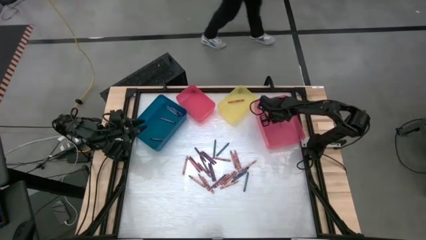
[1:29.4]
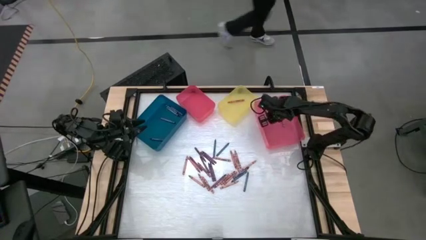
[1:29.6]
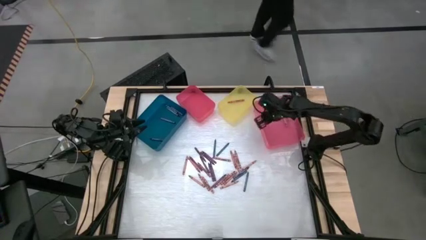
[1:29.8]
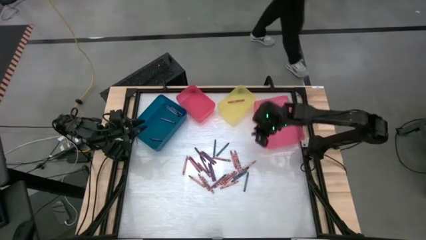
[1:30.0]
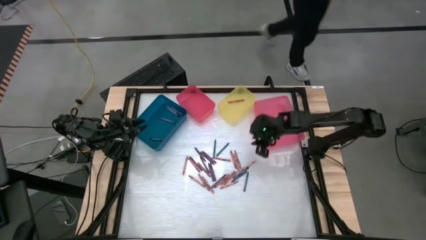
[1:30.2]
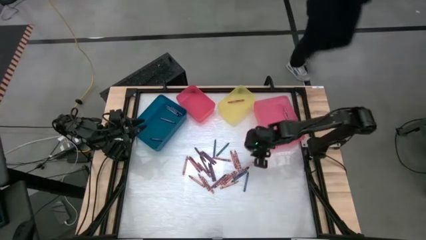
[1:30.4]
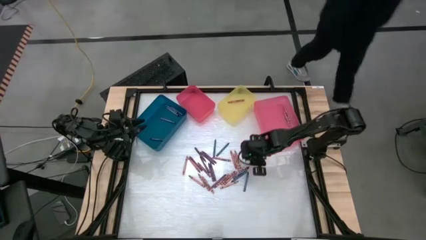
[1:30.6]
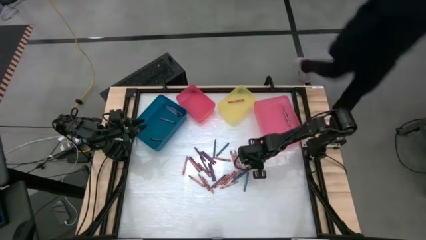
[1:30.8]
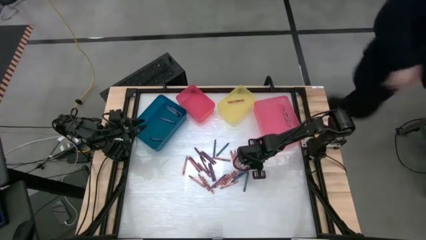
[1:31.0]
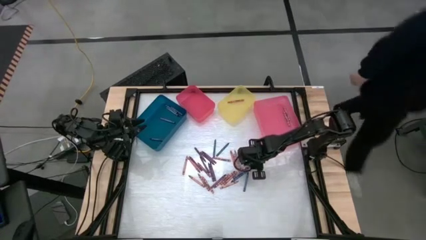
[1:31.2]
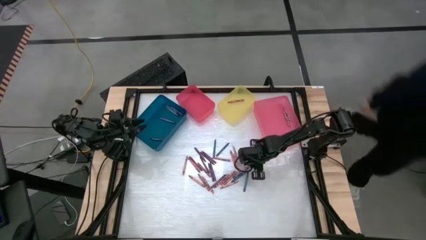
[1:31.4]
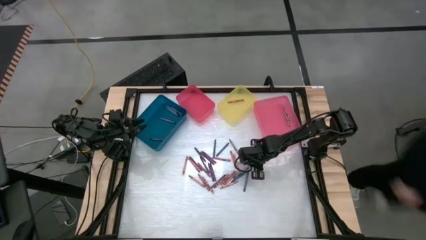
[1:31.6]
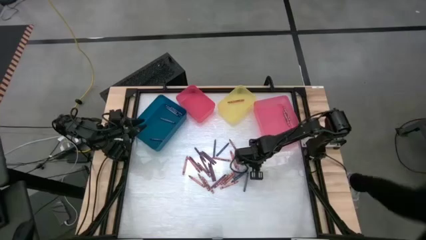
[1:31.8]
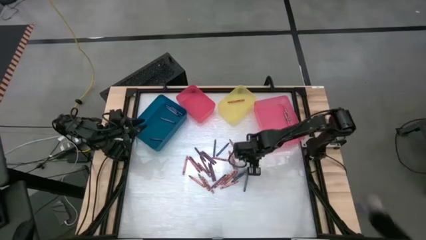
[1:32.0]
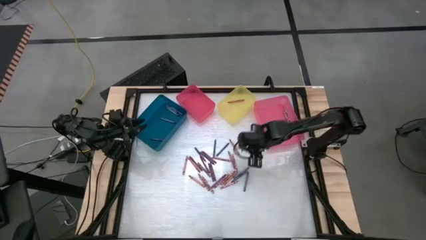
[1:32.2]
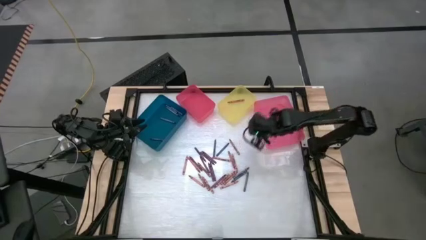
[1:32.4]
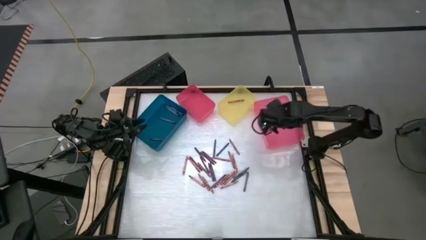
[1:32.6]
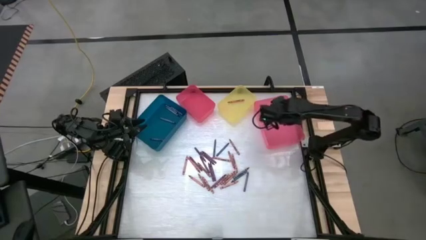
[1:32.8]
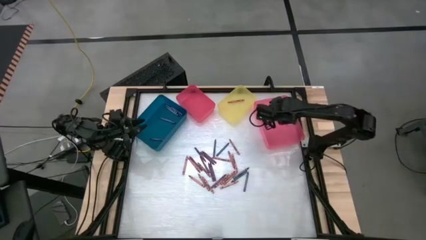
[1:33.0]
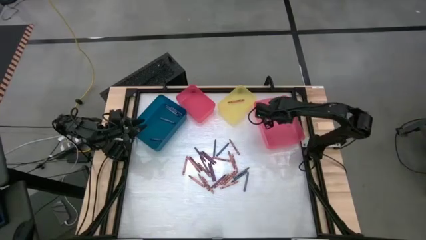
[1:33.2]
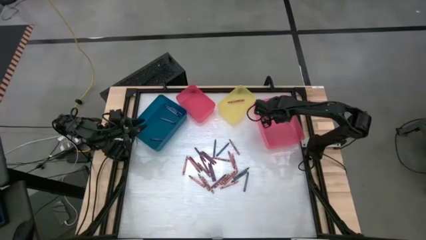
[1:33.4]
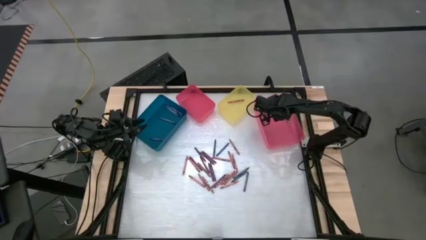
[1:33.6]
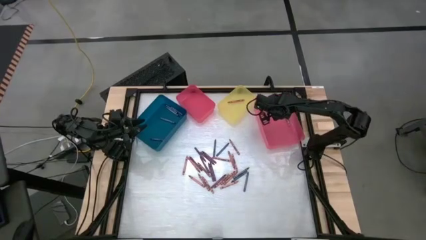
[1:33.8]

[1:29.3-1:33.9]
Task: Sort crayons
Put the pink crayon into the right pink bin

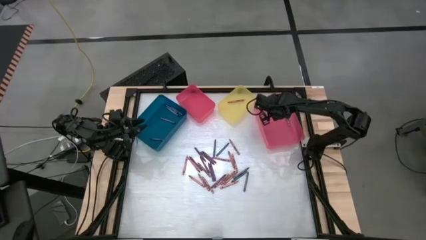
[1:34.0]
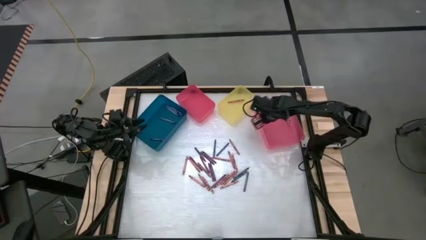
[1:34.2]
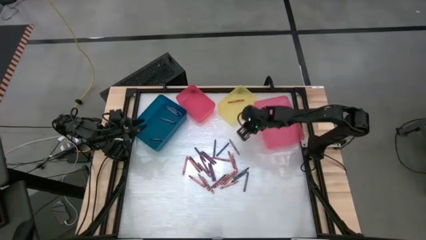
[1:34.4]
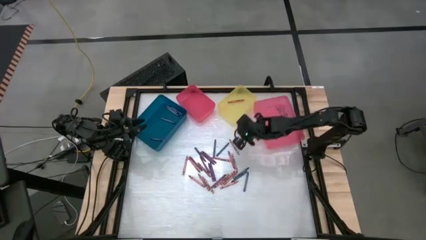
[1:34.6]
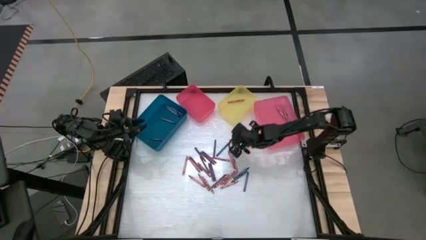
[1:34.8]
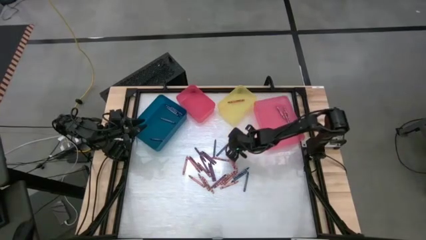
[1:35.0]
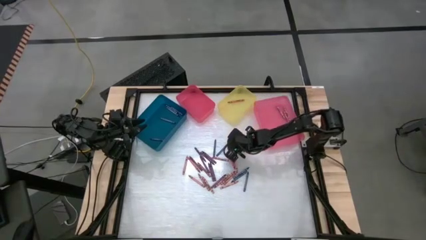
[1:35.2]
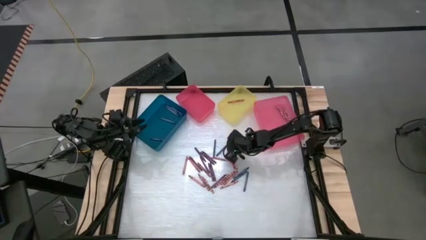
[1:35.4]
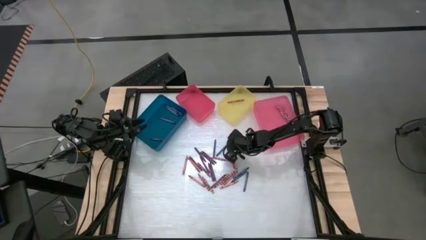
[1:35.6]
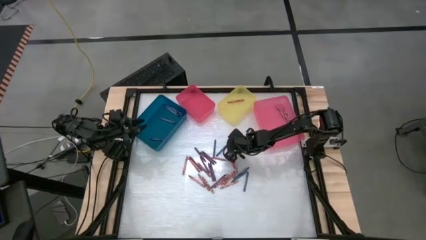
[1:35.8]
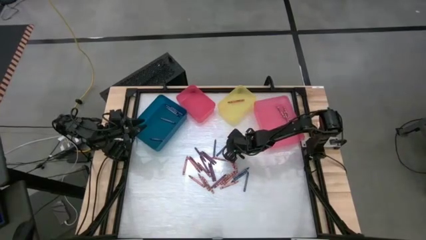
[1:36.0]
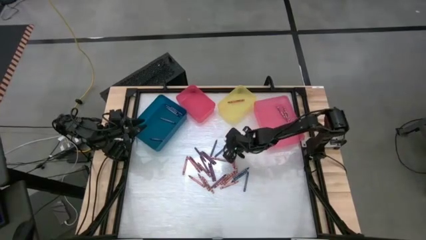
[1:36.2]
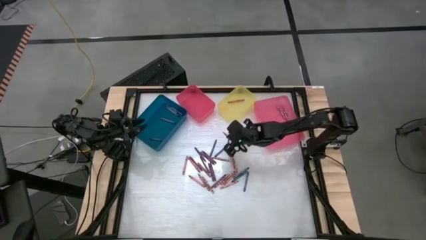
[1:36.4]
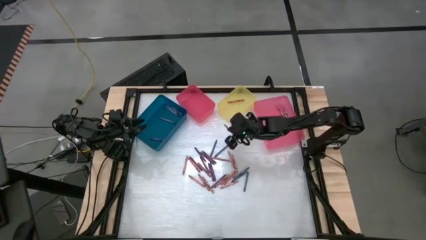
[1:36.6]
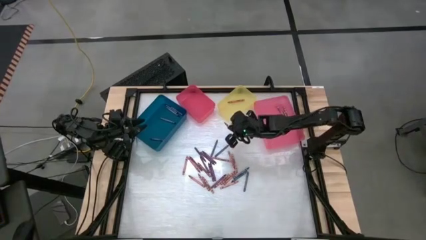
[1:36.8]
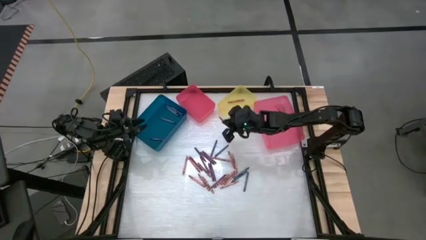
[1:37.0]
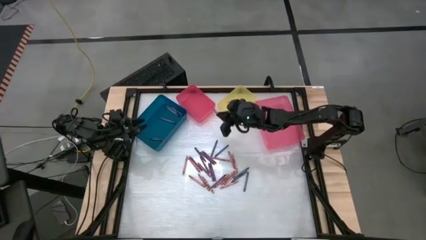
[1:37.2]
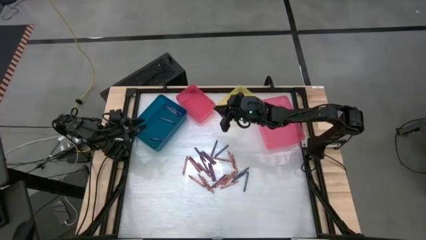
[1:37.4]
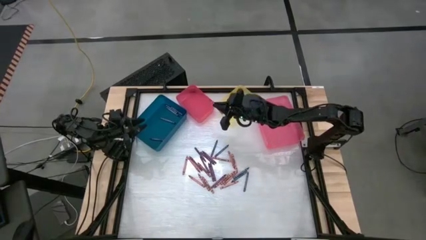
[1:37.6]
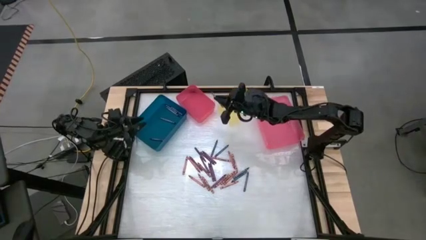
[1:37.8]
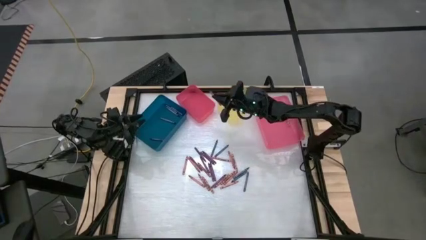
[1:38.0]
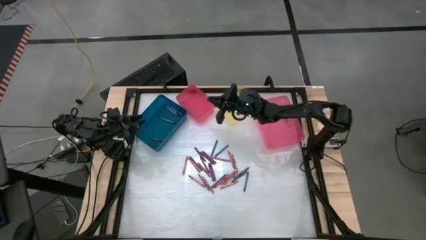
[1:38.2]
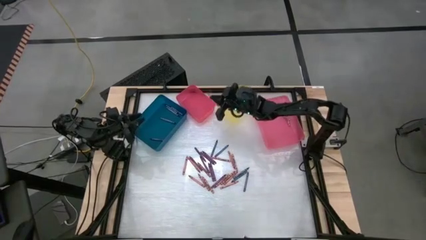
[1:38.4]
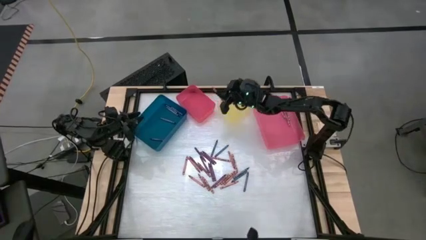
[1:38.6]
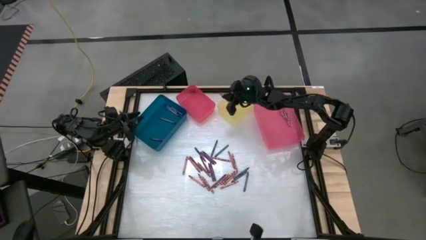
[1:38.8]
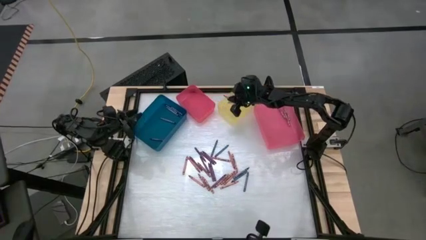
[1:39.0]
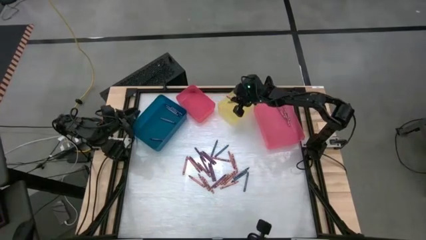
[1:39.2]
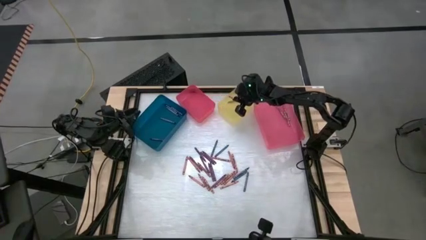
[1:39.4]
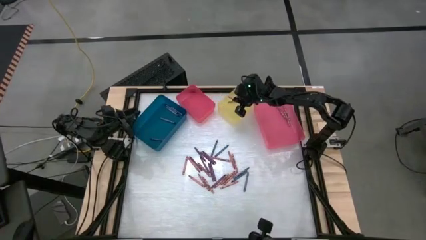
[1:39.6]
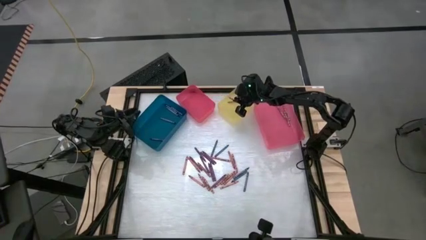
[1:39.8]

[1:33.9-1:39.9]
Put the red crayon into the yellow bin

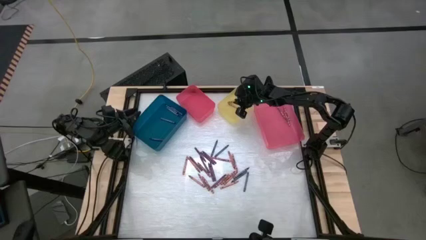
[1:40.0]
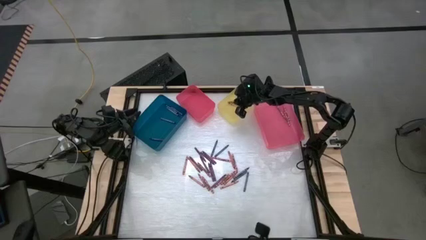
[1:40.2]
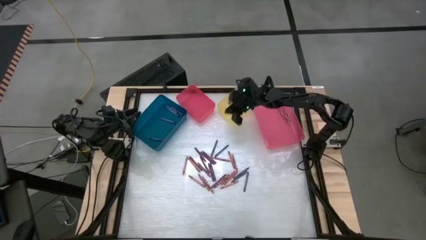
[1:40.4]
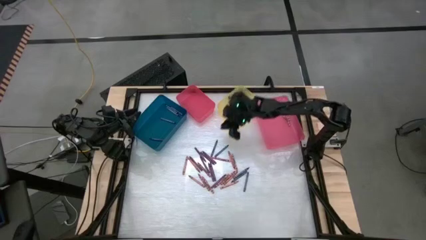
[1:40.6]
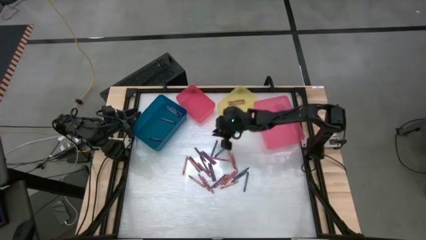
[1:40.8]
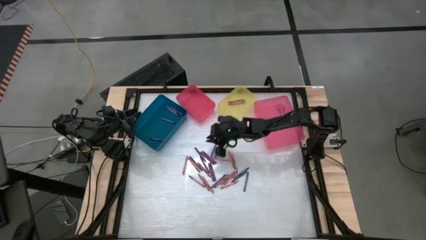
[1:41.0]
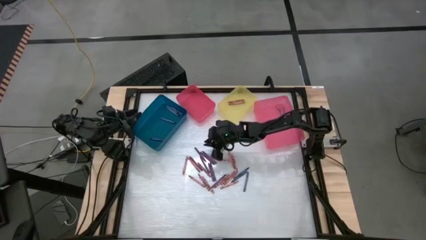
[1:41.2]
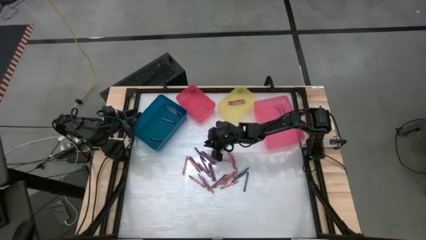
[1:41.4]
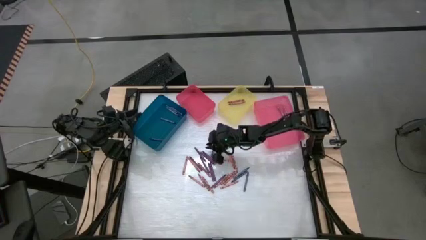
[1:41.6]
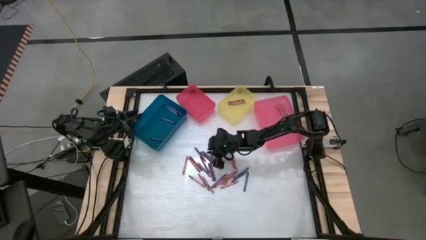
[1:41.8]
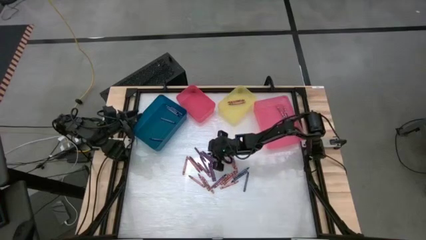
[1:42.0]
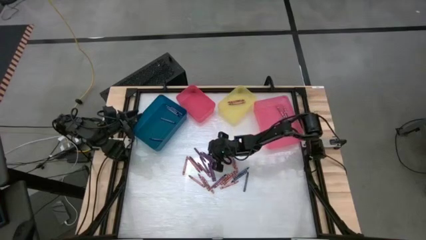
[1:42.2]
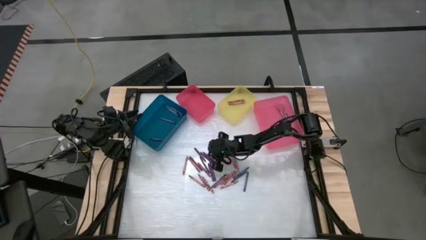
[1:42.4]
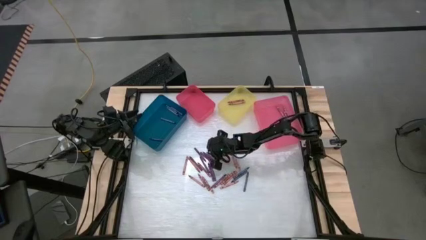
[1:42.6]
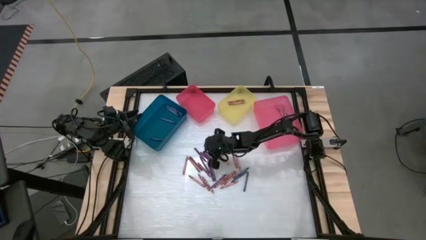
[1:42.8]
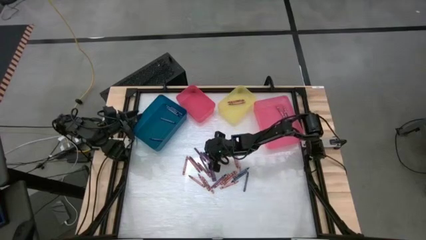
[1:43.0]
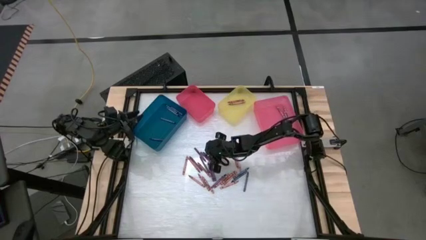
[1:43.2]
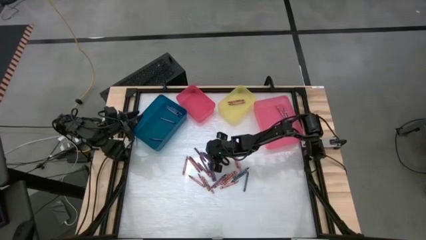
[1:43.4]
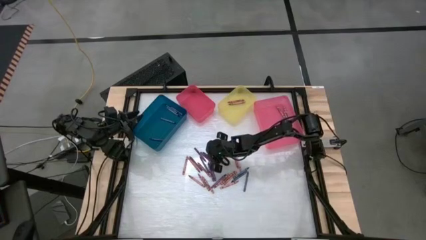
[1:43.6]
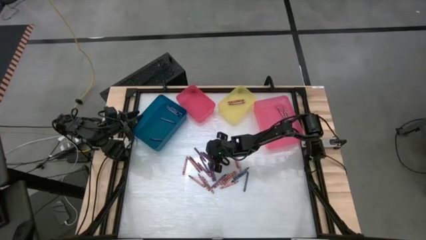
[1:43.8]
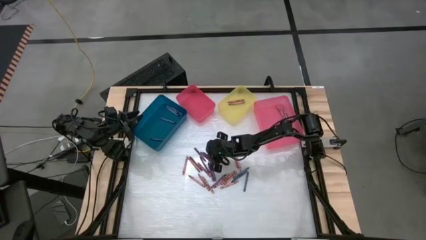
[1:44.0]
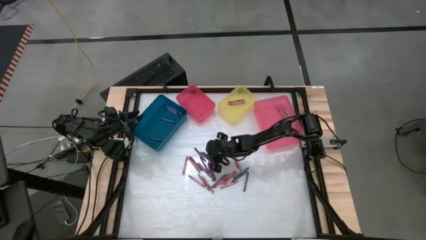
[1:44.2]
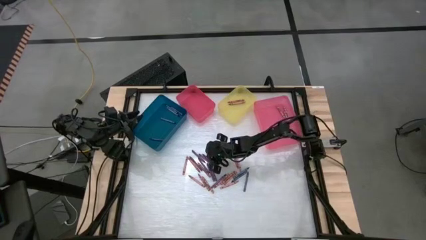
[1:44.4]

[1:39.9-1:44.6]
Put the violet crayon into the left pink bin

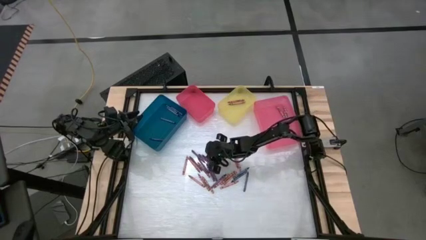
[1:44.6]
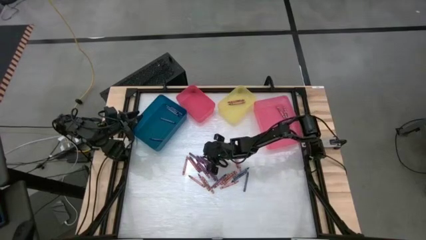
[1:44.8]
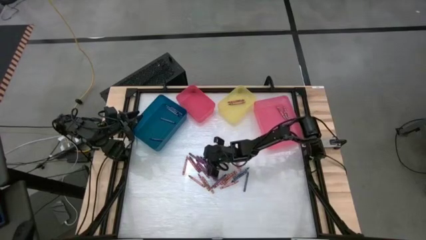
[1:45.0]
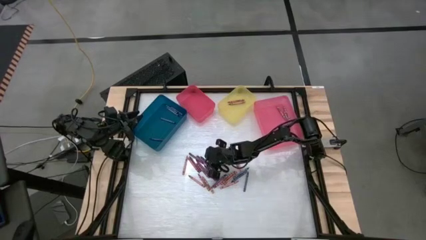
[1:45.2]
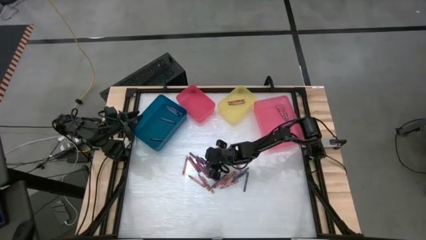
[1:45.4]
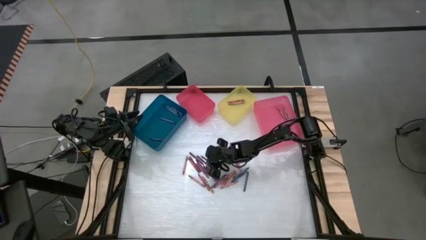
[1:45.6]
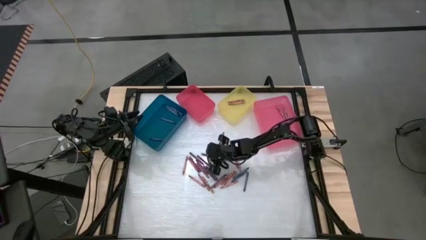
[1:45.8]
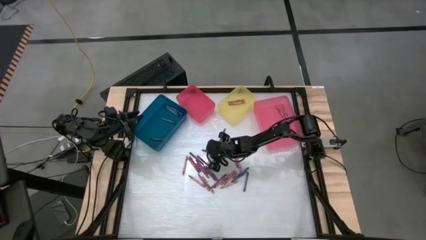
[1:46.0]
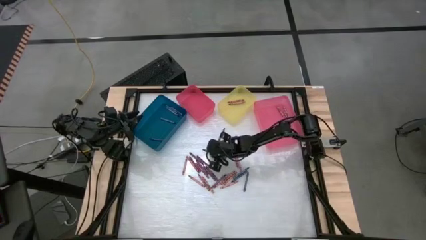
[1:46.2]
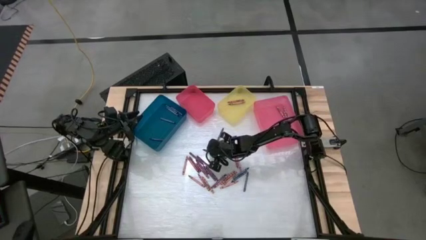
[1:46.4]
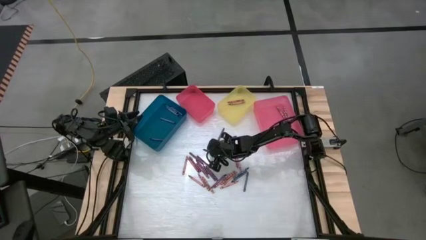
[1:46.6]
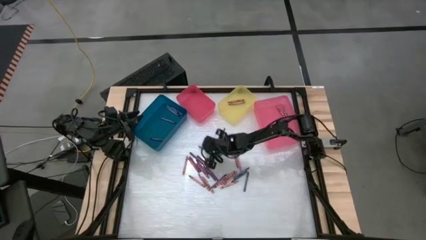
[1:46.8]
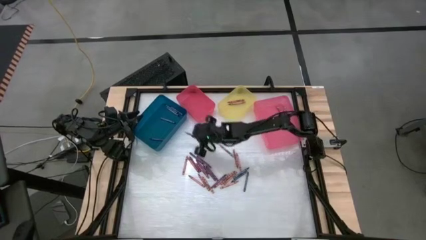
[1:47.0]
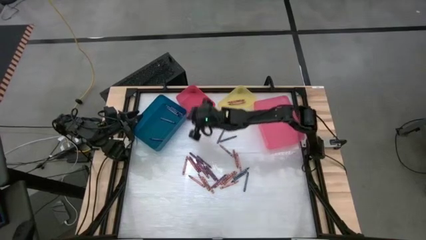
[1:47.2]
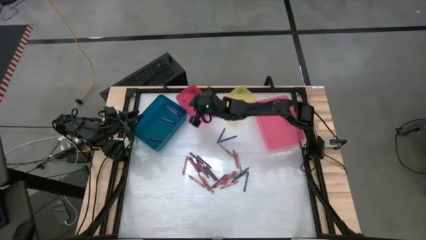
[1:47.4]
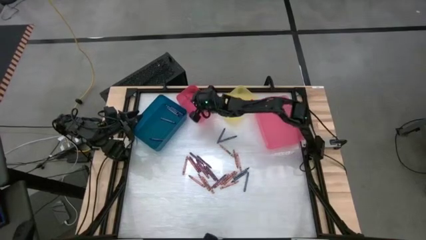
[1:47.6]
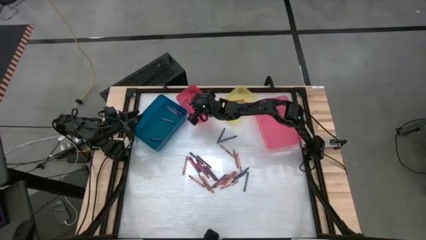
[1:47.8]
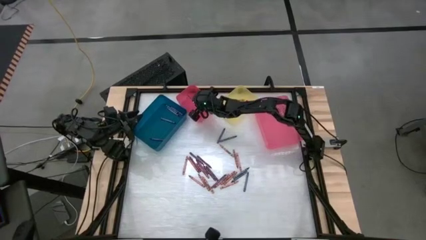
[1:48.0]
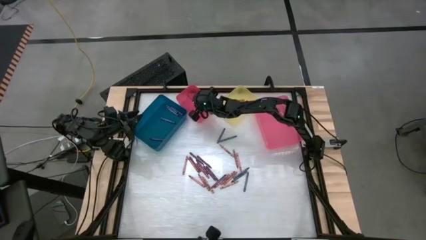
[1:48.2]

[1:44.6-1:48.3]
Put the violet crayon into the left pink bin
